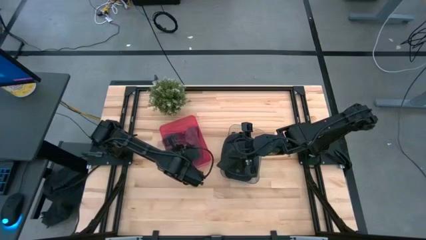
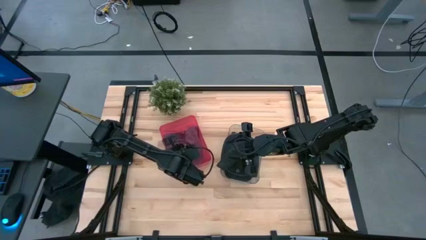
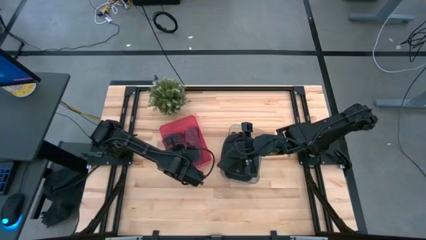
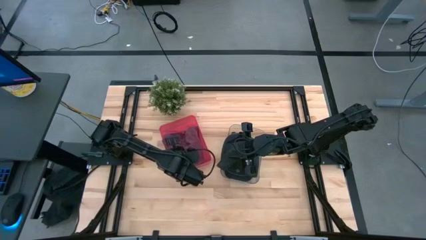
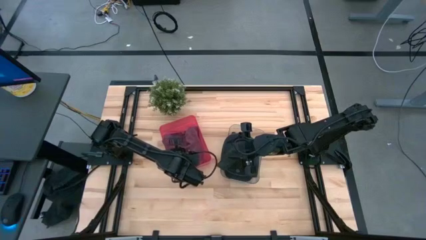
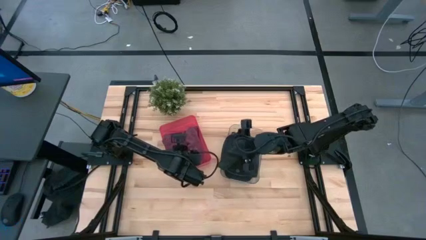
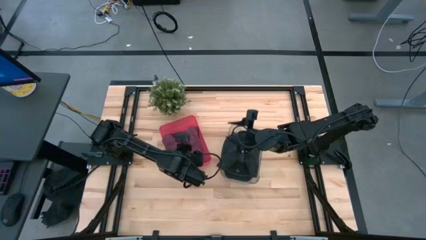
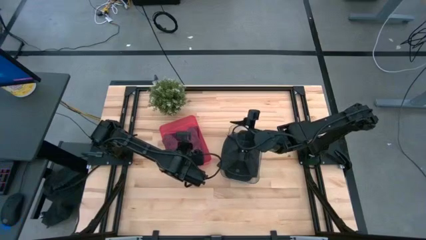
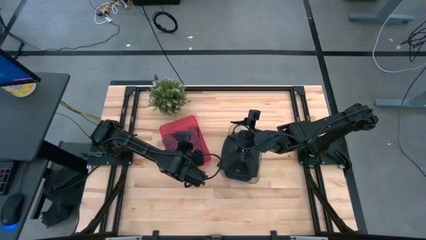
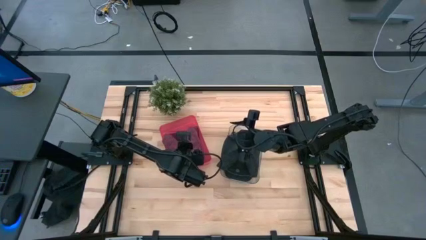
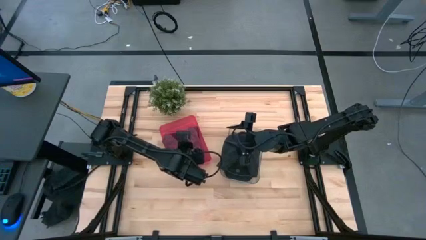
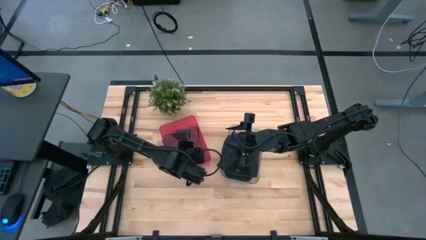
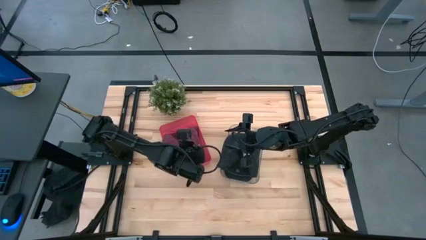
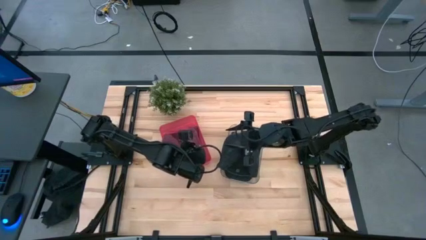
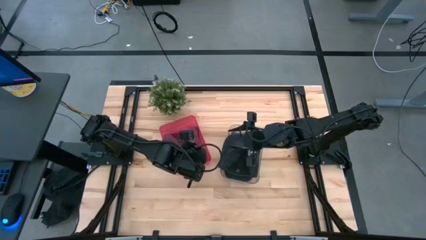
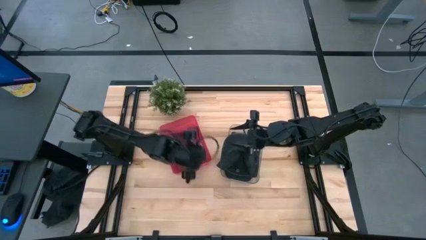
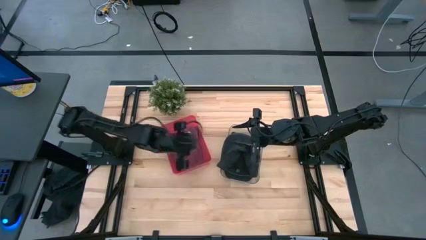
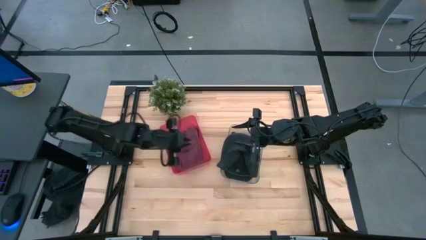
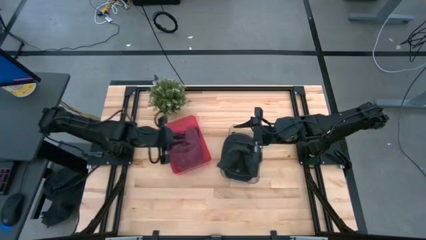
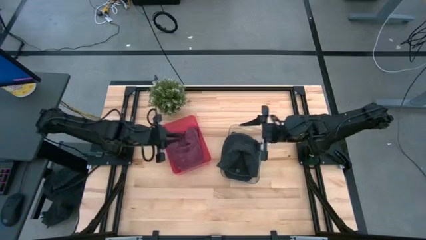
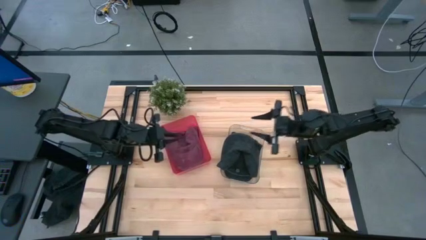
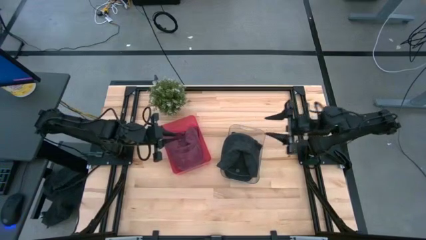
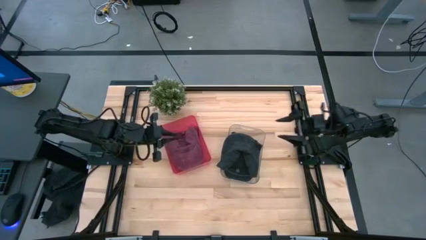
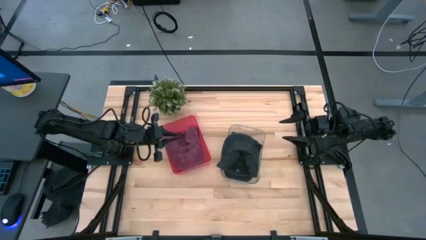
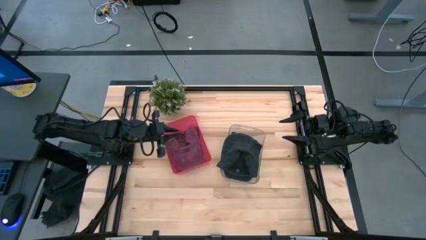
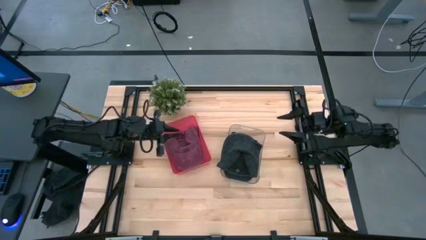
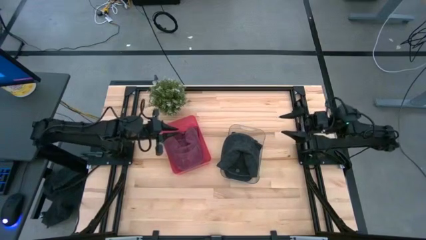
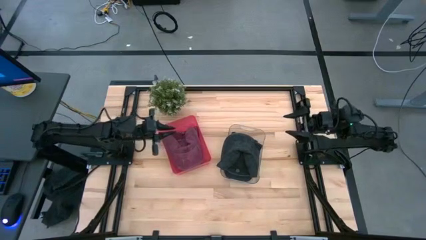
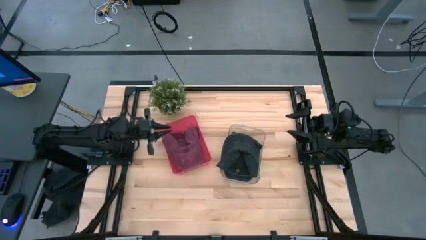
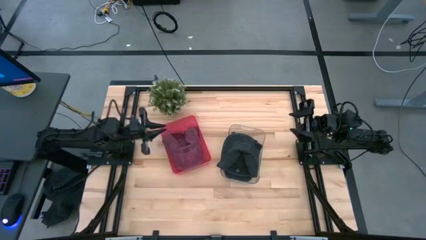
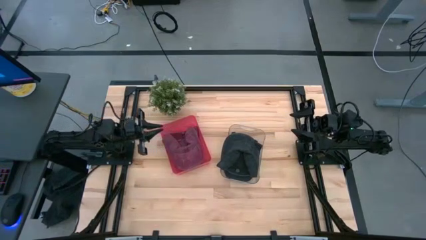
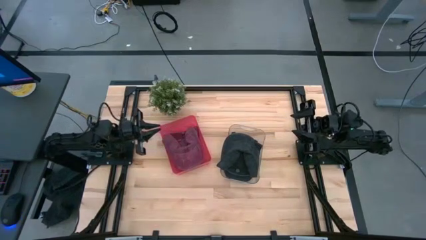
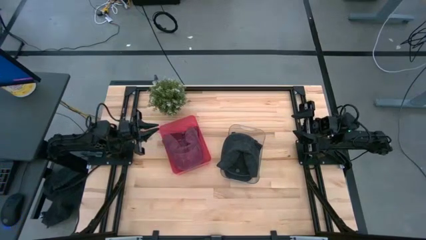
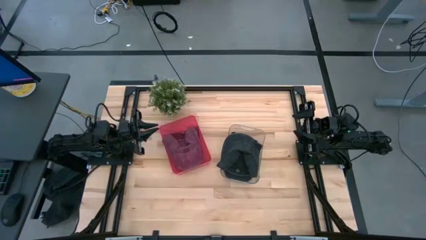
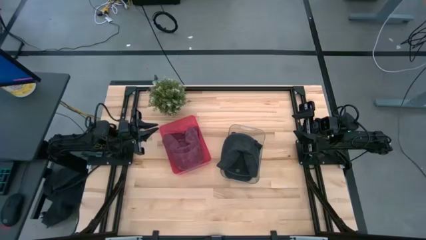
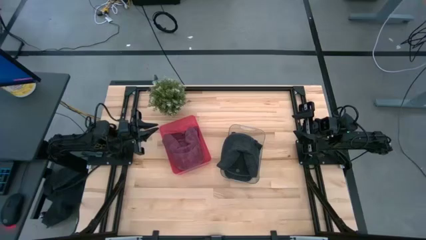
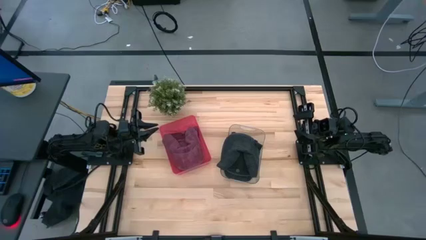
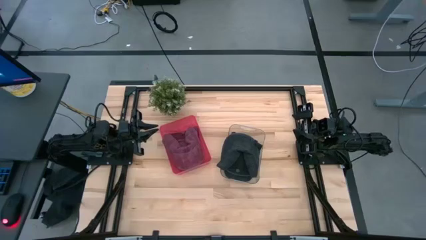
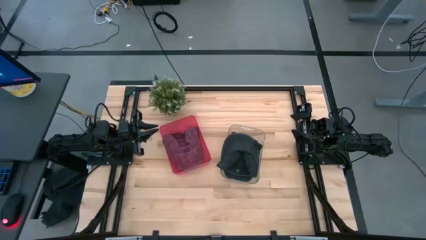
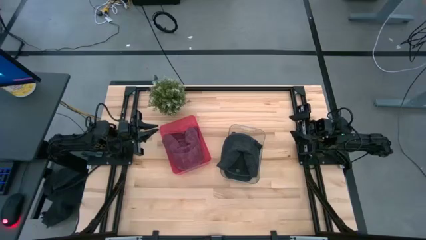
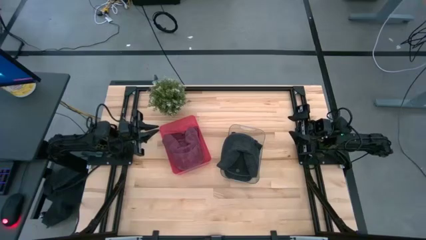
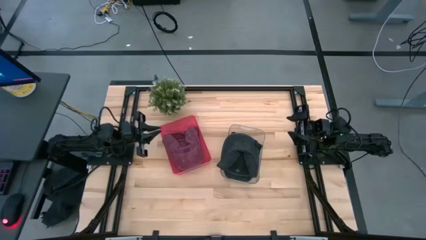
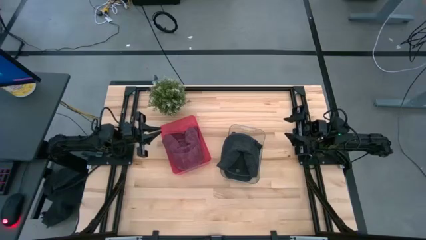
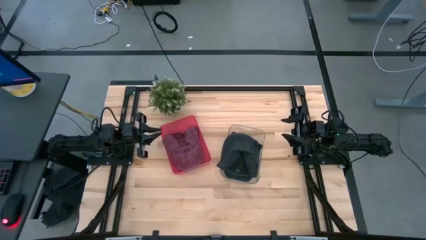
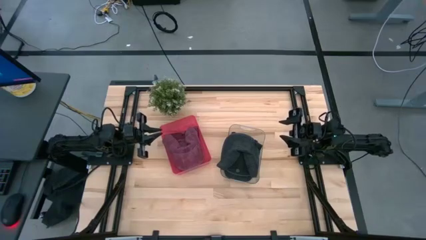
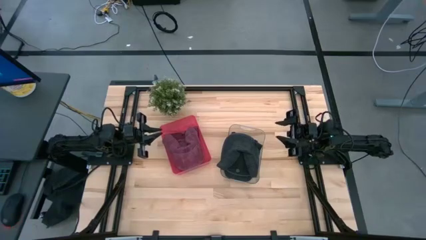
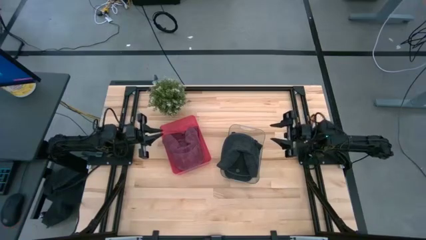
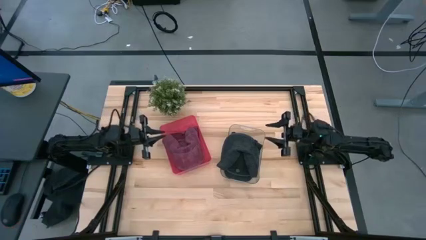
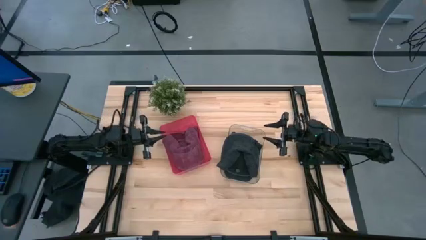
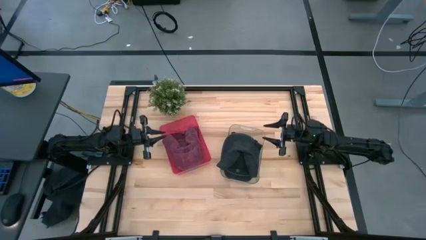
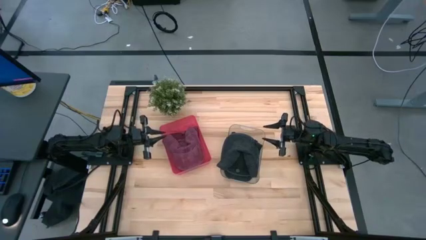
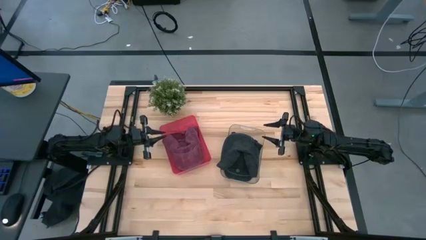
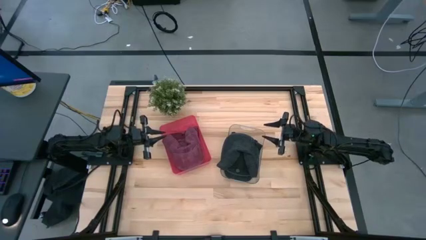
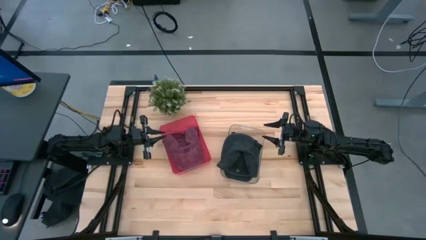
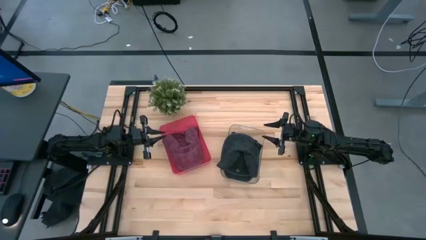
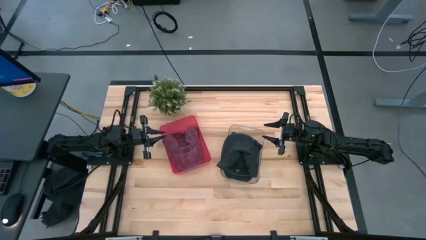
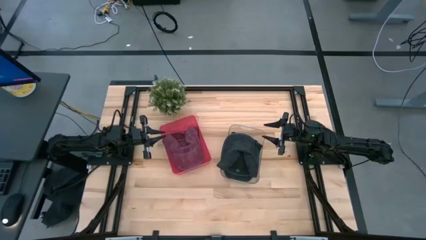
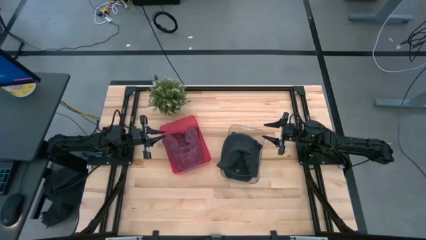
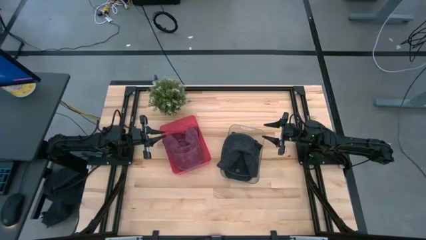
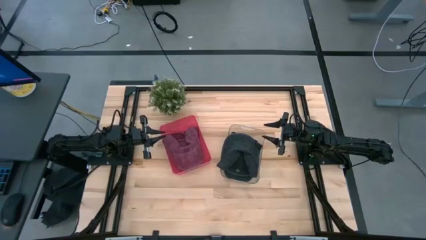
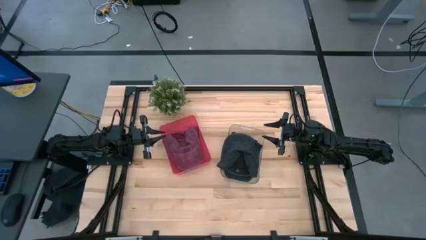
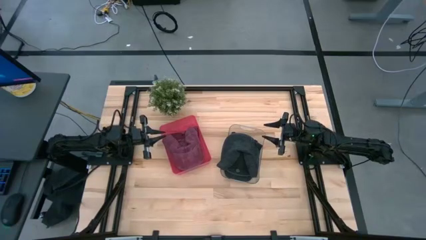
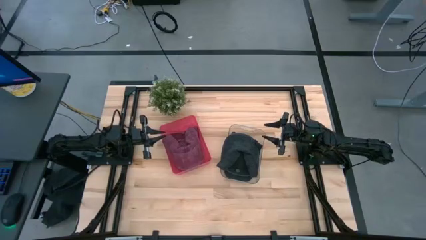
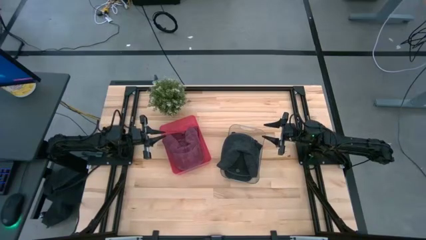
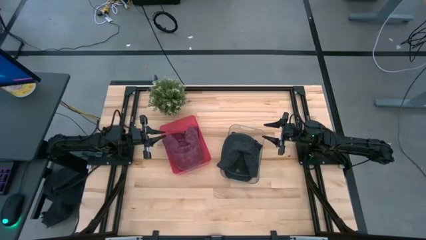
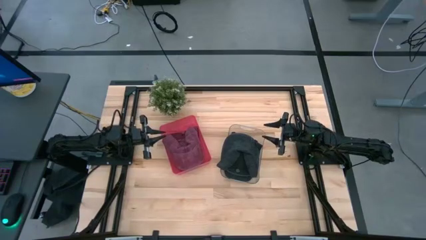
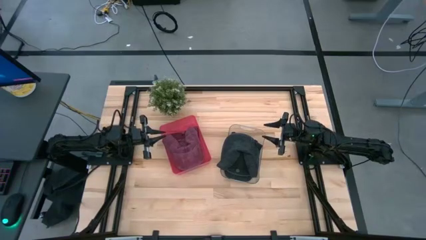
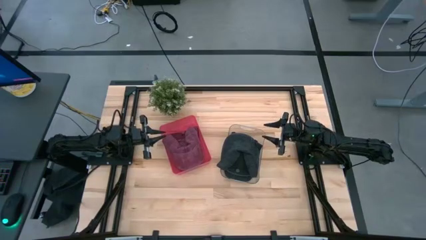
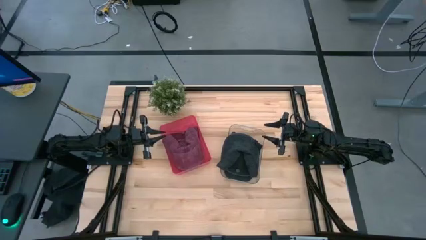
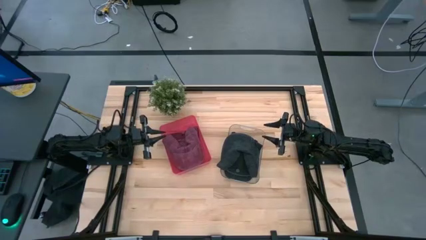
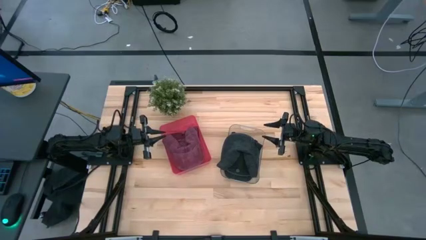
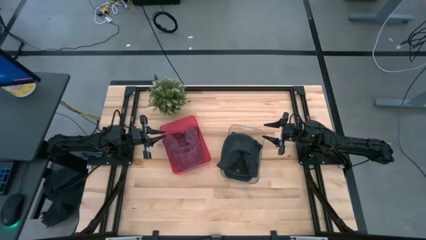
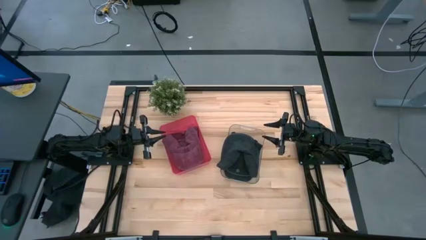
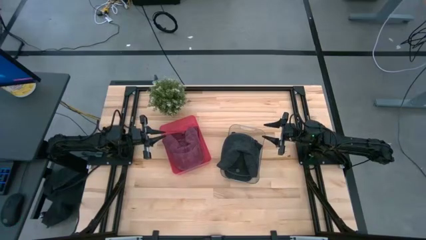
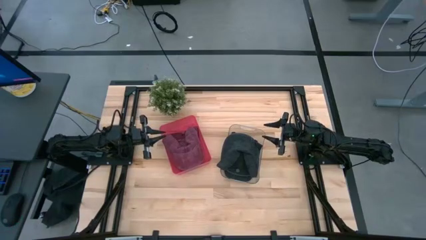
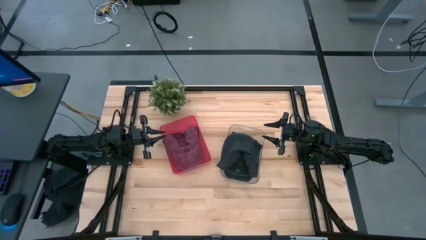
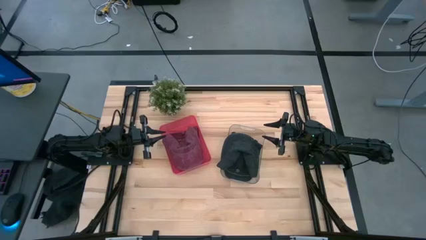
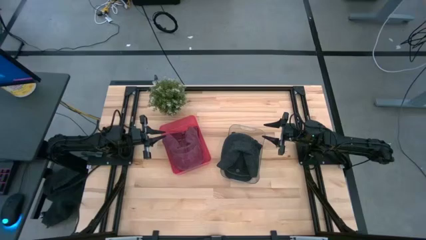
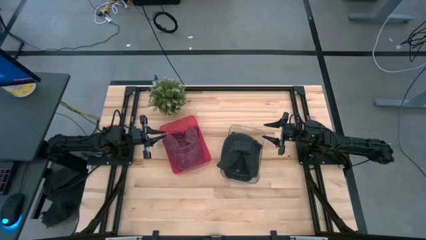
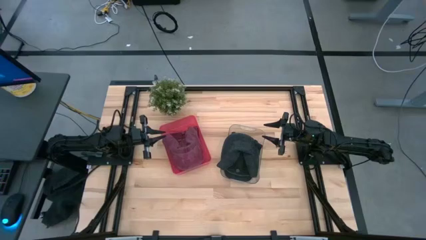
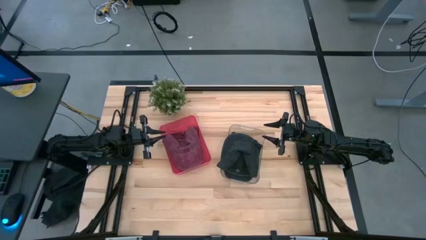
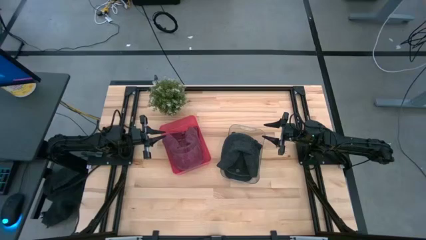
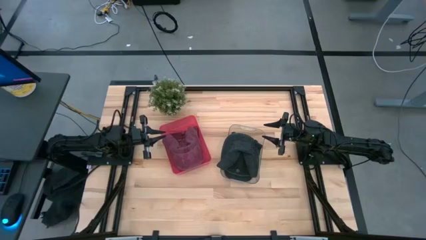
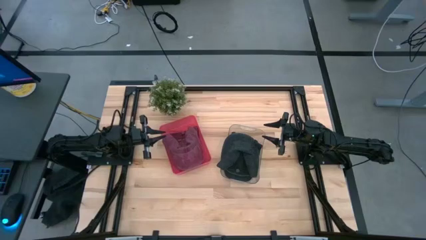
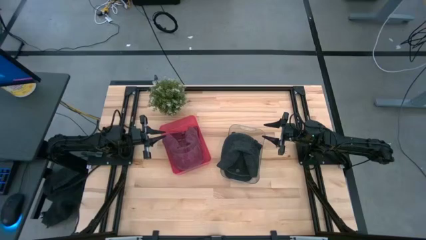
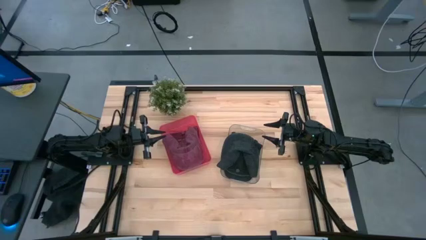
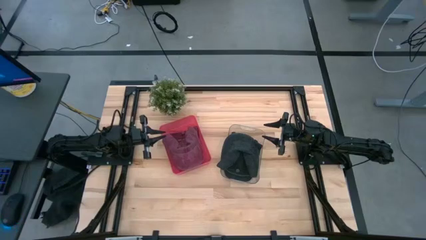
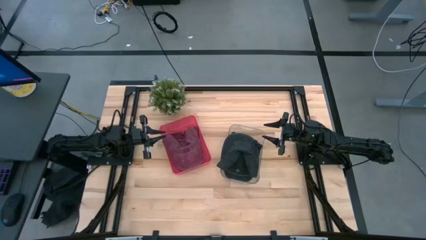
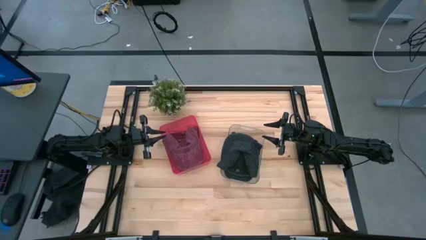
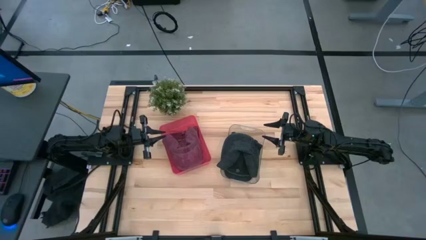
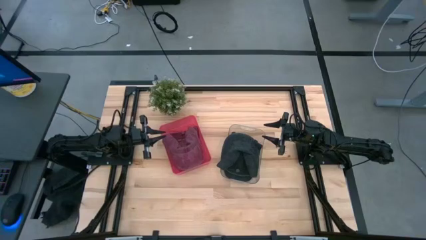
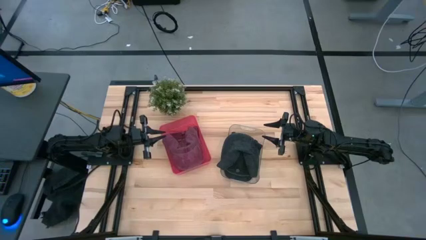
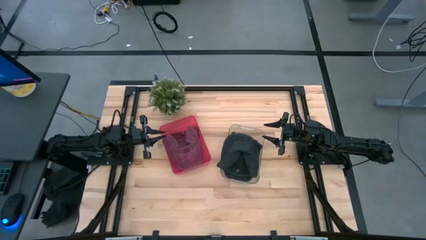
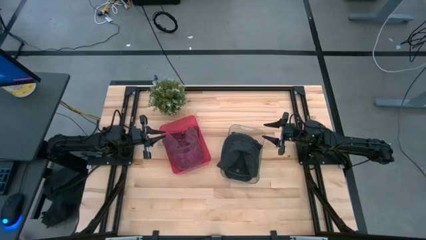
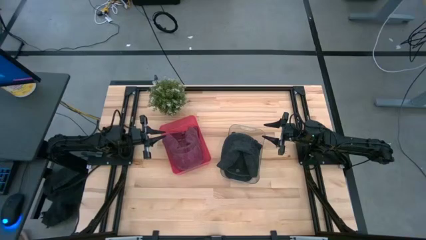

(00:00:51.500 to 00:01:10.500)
Task: Pick & Place hat
Return to home position
